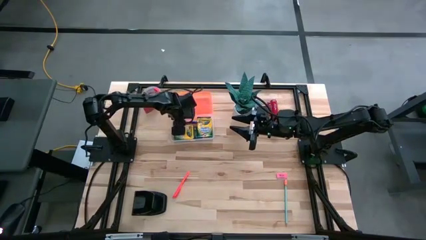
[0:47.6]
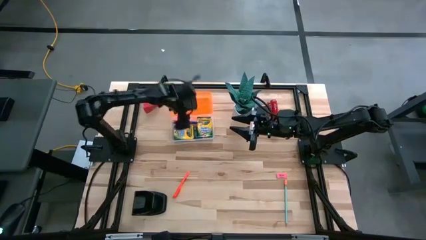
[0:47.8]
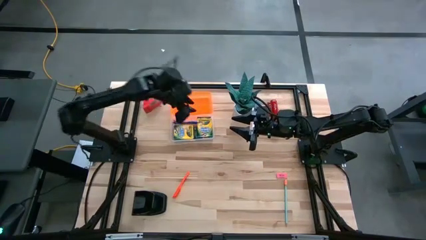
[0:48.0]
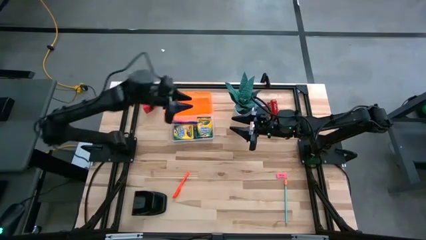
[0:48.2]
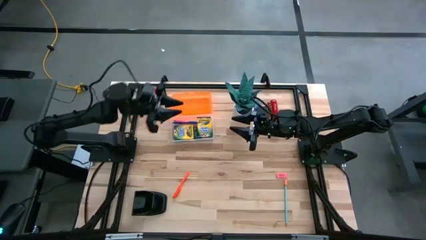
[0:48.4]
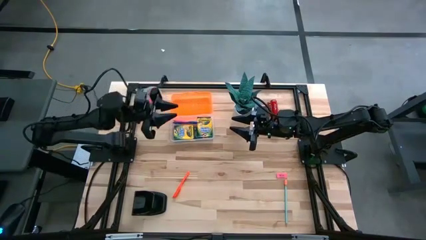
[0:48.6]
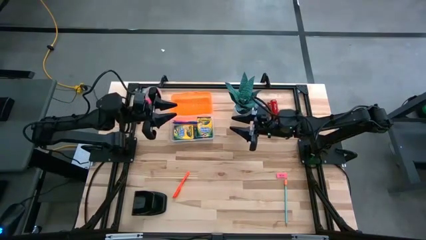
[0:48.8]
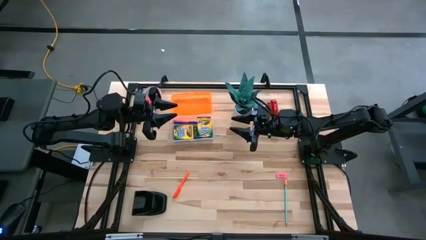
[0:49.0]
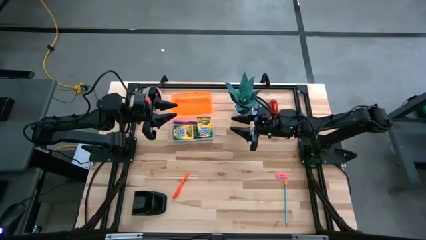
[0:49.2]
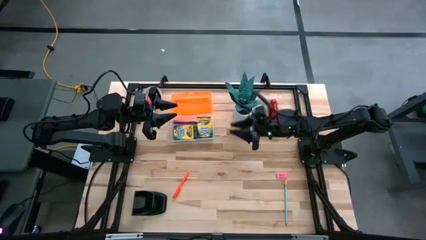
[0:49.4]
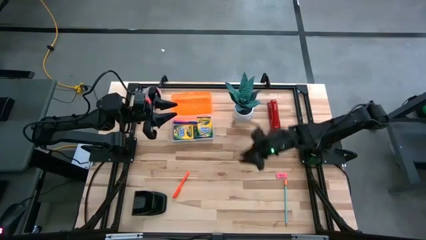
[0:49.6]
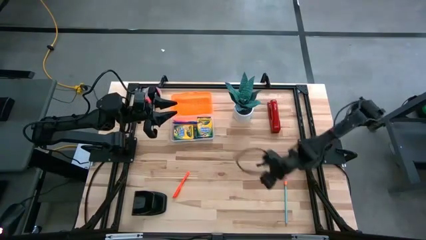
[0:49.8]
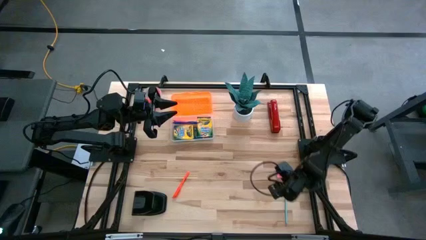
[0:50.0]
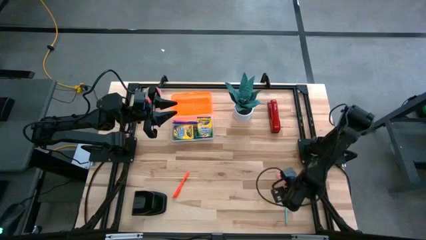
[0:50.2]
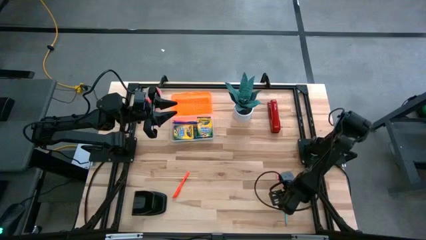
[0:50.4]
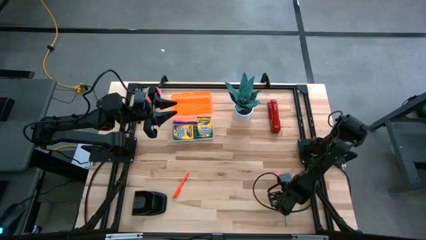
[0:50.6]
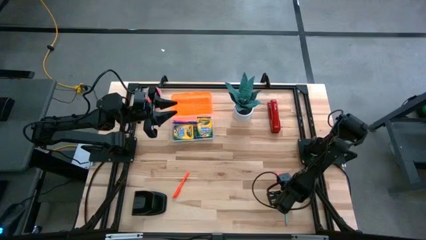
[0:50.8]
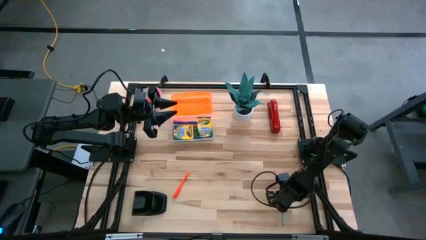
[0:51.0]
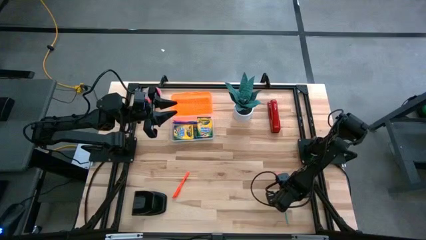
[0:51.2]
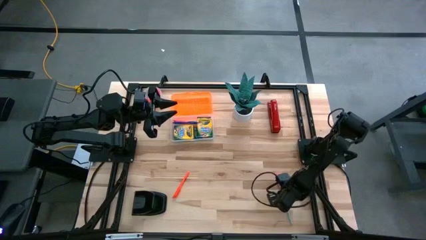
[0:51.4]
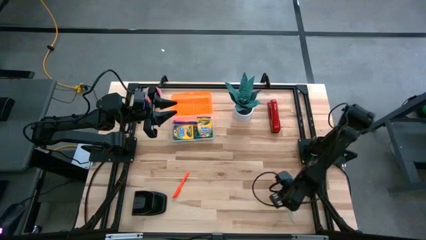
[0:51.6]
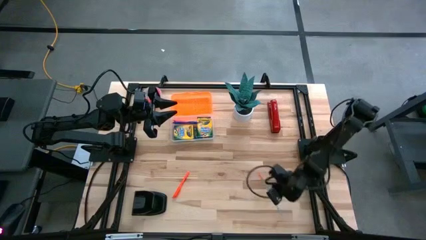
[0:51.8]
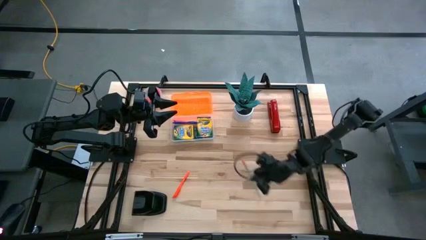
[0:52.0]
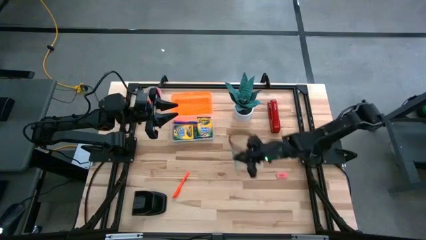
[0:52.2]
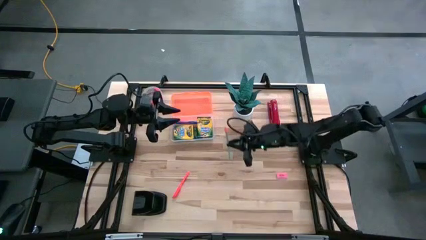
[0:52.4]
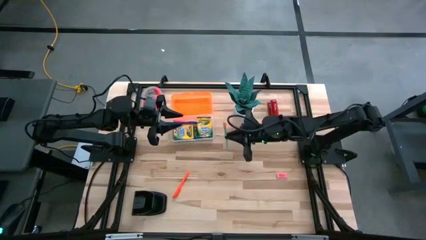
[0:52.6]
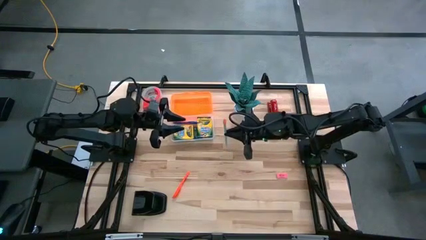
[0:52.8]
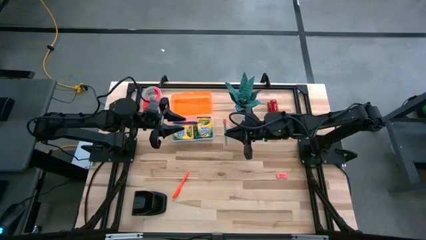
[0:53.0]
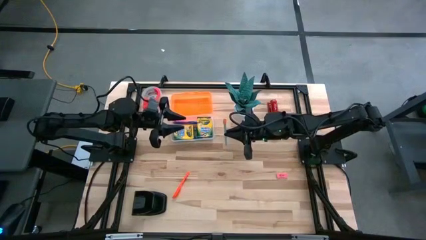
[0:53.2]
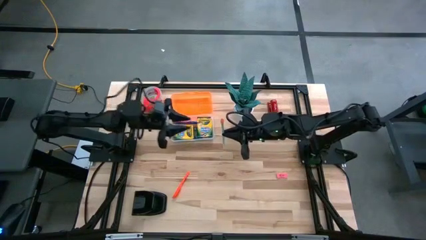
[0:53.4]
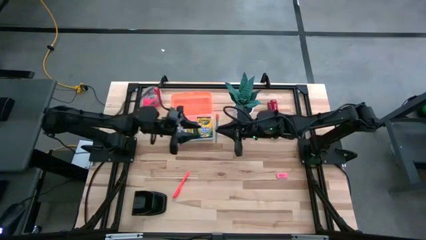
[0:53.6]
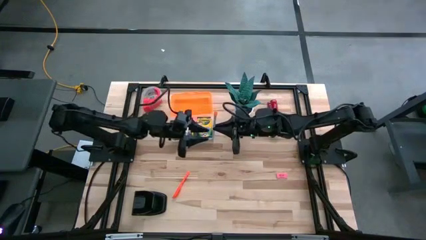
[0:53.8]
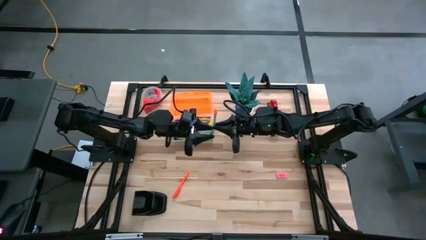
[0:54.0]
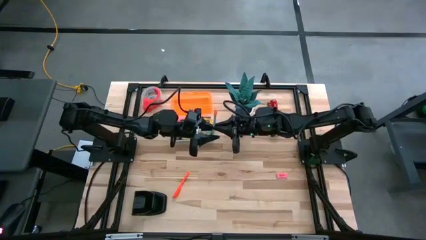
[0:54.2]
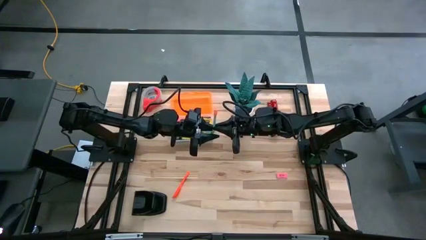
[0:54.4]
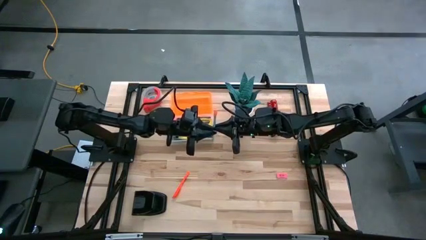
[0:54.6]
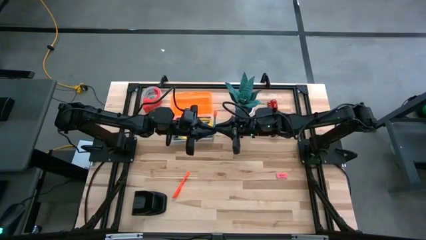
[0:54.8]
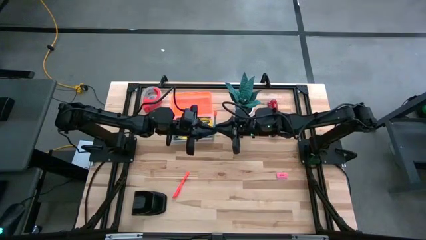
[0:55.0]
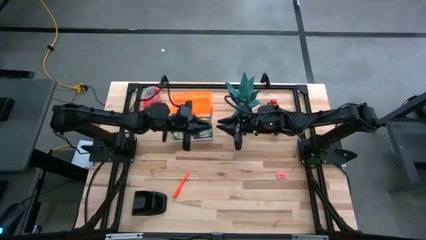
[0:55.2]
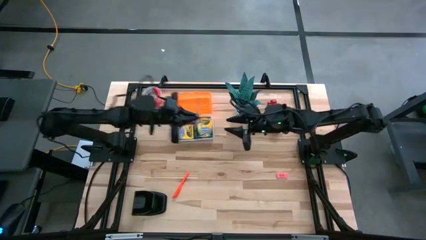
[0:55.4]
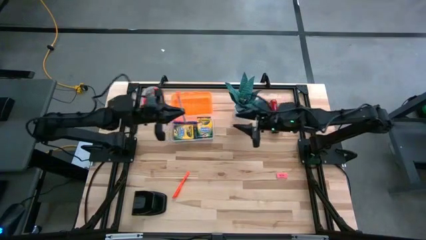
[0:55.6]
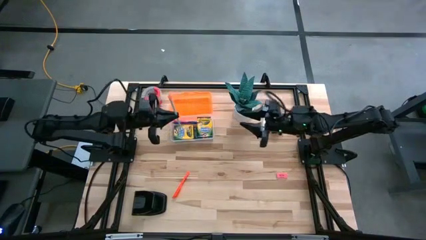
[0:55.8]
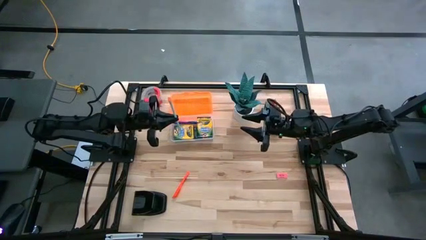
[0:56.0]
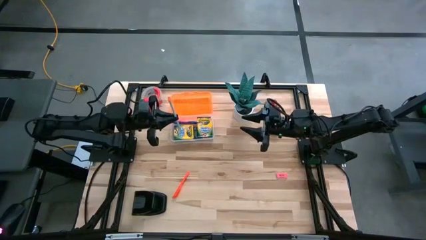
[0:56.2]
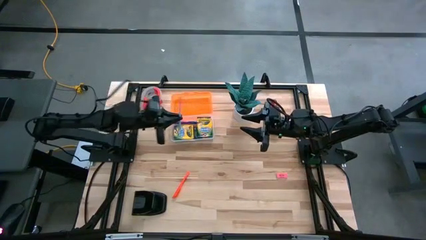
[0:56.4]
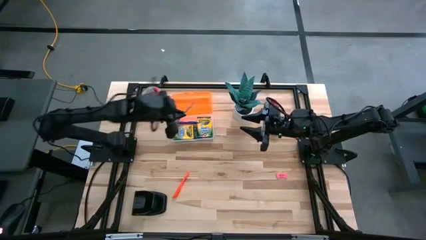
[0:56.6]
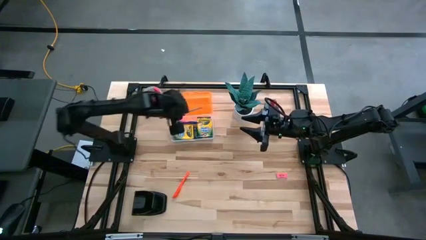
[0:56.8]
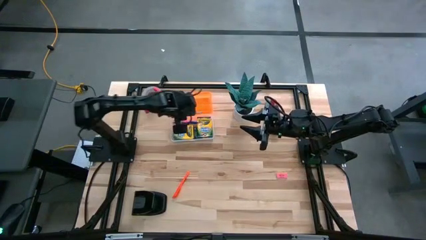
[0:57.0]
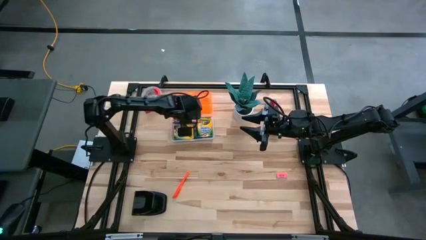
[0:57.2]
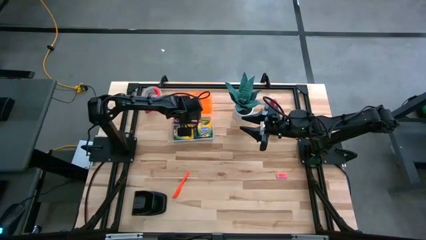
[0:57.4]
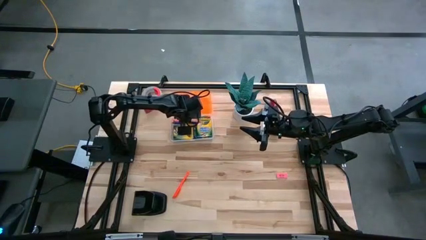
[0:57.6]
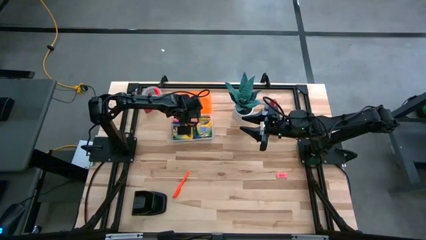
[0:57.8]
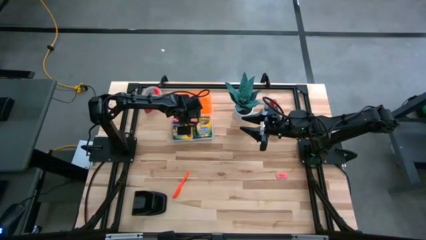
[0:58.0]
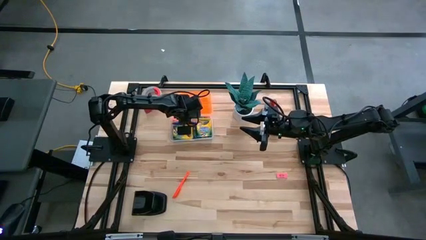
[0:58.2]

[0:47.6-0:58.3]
Task: Pack school essentials
Put the blue colored pencil into the orange supply box

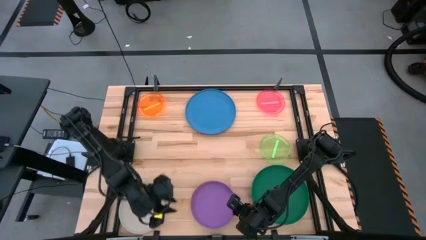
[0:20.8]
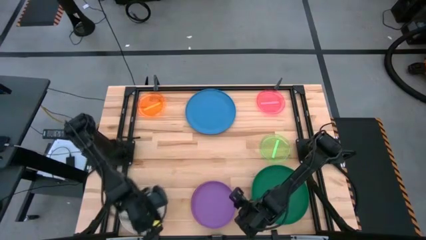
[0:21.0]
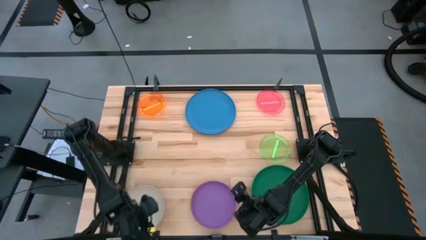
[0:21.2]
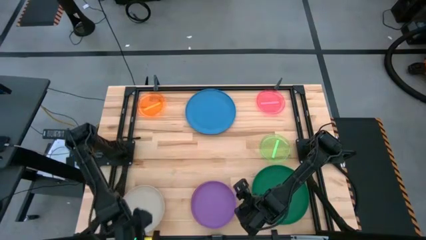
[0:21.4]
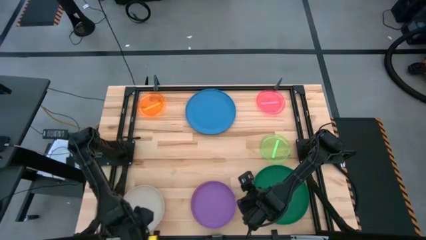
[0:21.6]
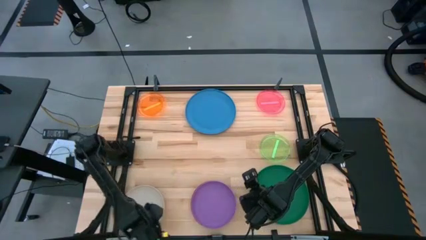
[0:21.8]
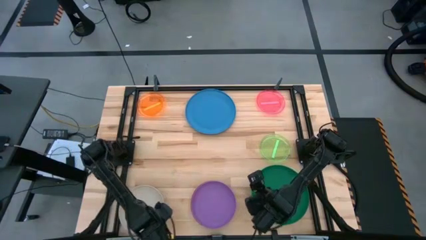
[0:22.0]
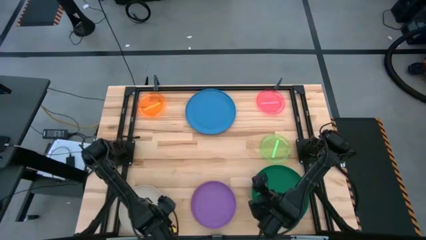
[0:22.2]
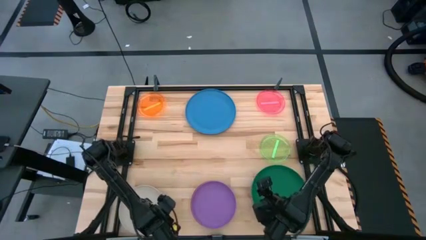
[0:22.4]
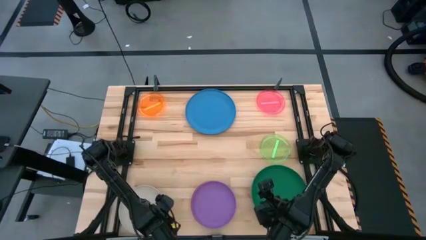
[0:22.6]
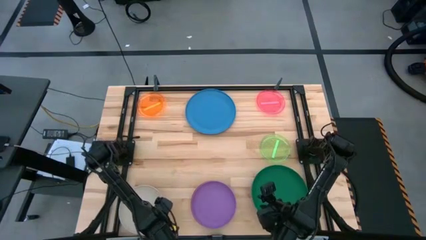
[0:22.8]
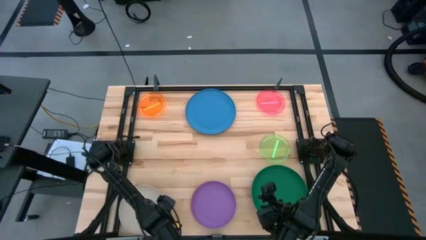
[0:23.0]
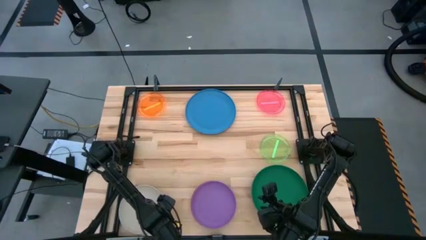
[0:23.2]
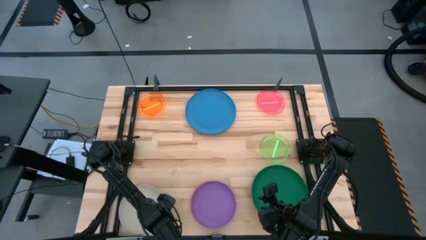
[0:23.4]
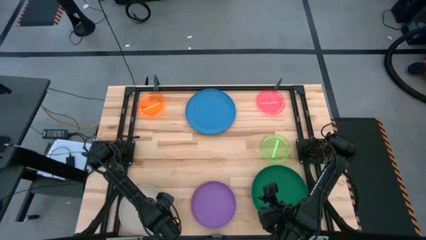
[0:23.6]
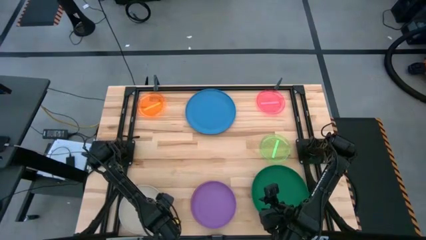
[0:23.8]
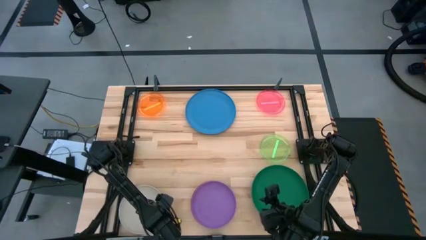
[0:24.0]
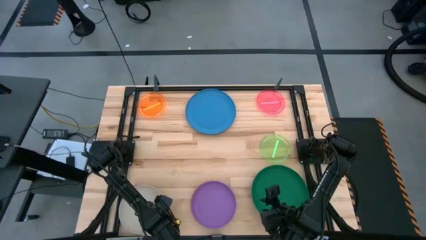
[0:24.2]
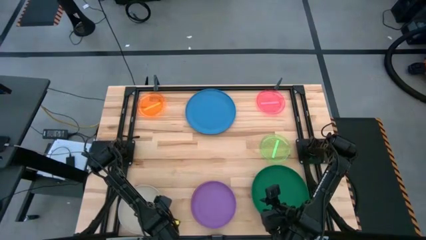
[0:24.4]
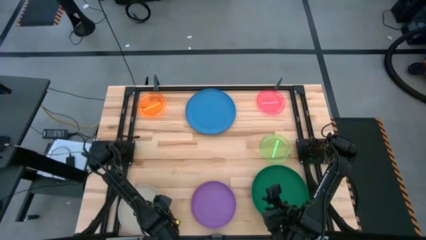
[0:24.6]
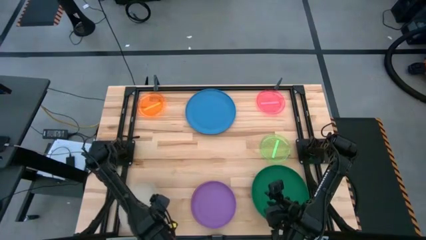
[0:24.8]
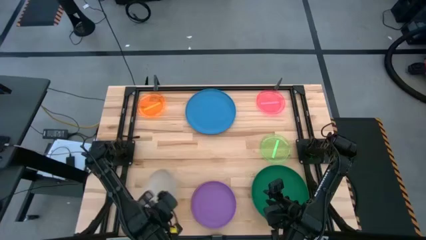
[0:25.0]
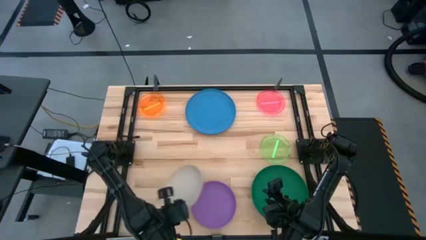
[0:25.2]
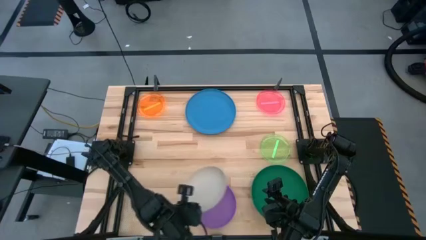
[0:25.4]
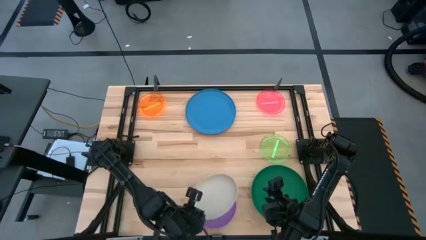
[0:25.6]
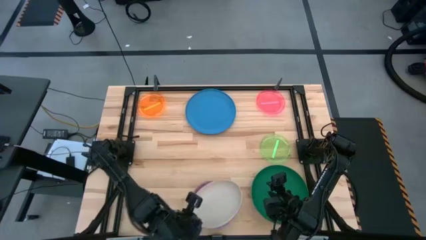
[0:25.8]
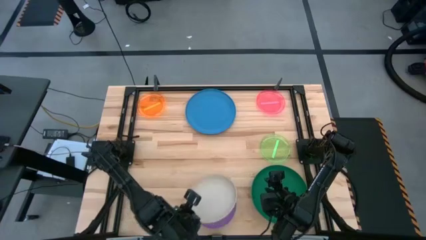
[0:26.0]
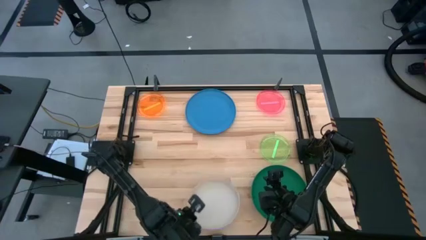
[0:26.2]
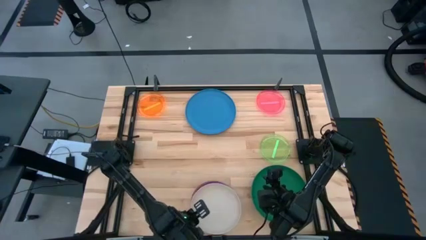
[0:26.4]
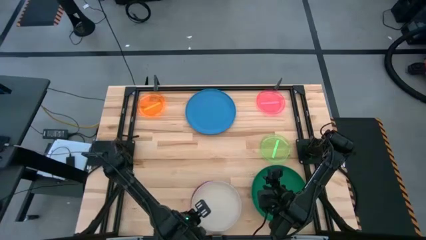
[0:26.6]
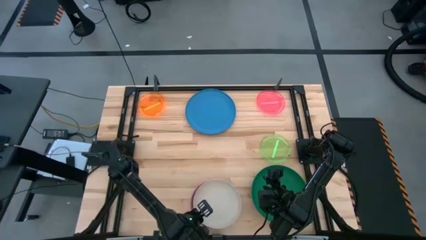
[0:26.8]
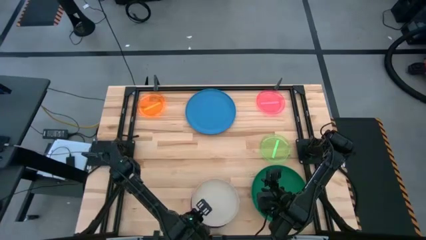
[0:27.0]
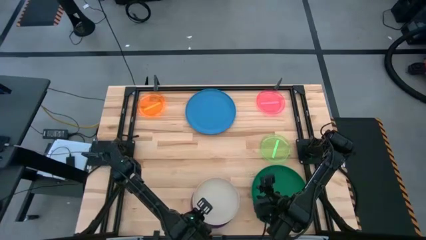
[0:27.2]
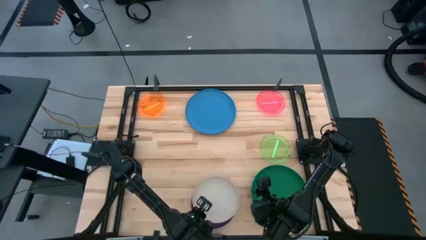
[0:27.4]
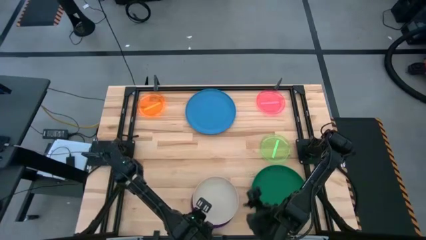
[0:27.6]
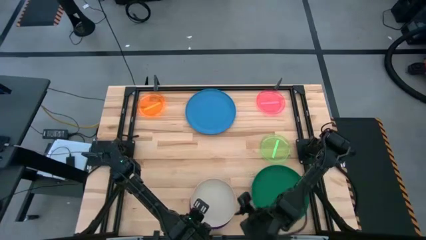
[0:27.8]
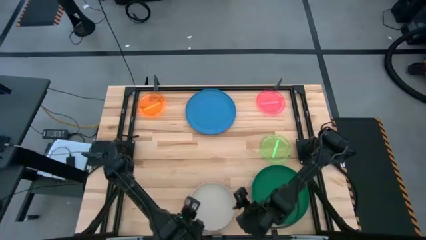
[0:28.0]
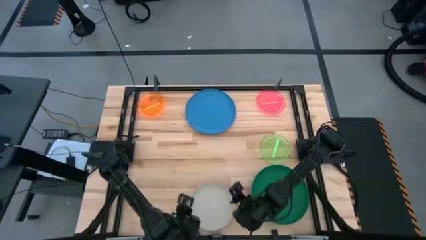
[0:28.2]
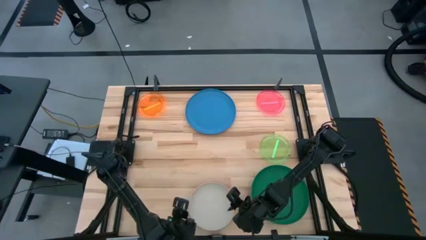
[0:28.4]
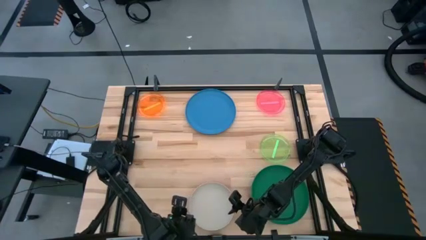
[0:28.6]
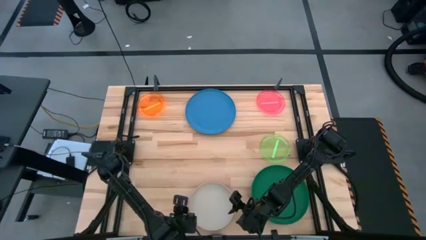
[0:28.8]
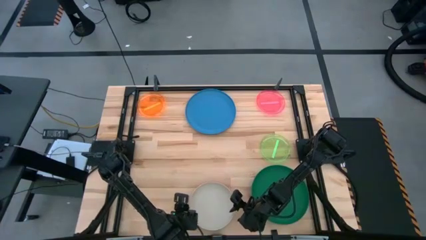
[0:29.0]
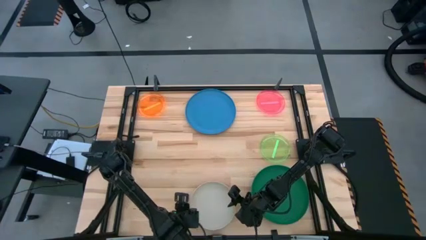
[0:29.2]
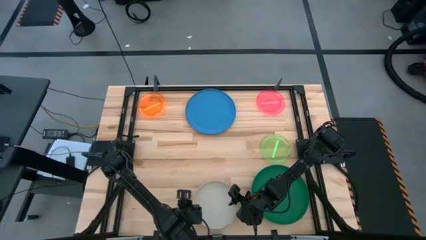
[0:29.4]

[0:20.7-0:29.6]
Task: Stack plastic plates
Stack the gray plate on top of the purple plate
